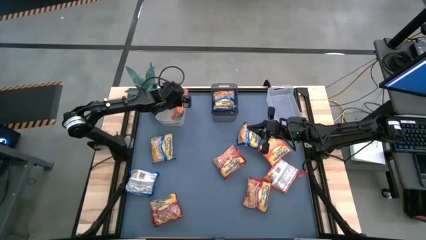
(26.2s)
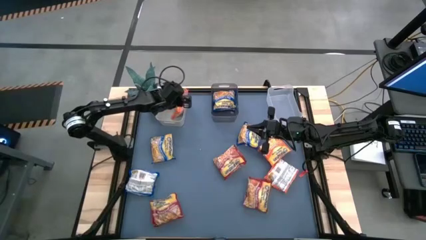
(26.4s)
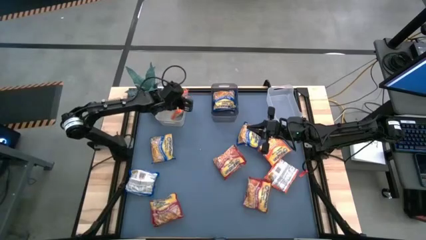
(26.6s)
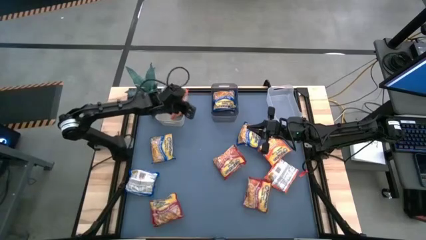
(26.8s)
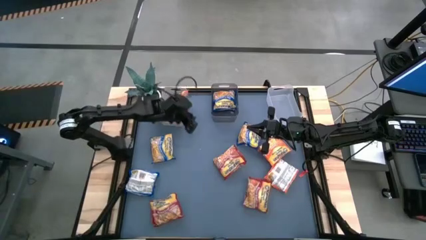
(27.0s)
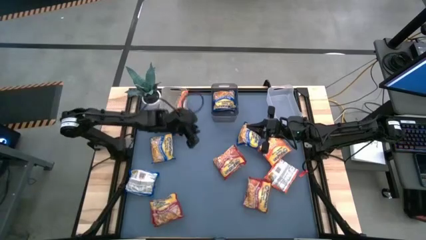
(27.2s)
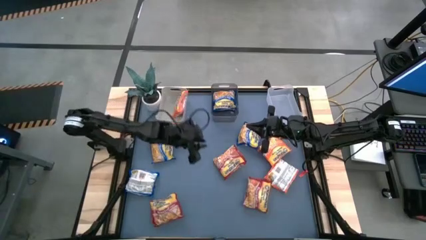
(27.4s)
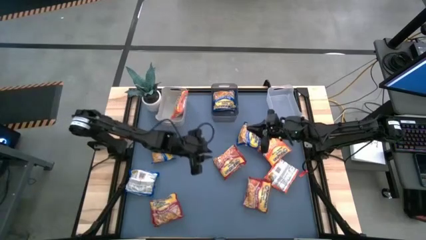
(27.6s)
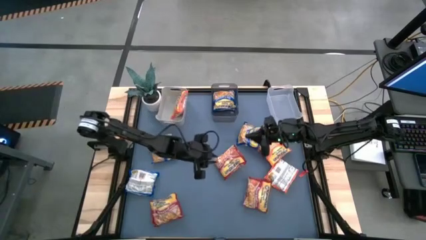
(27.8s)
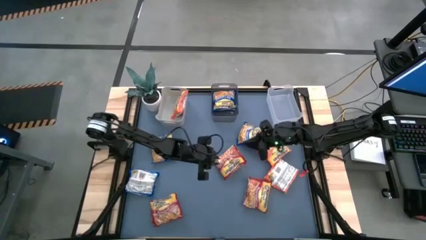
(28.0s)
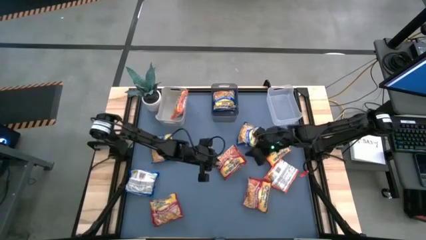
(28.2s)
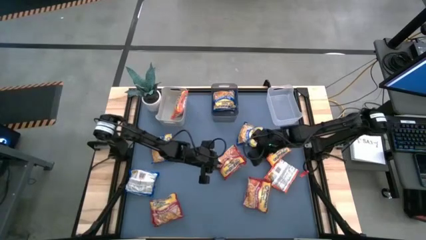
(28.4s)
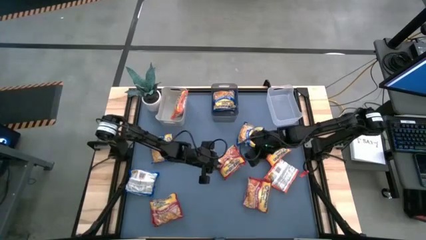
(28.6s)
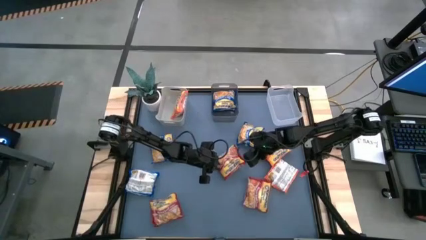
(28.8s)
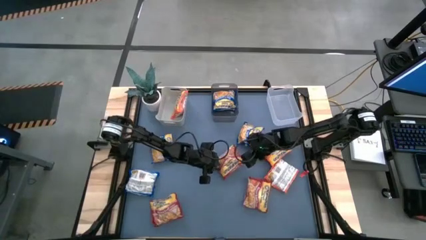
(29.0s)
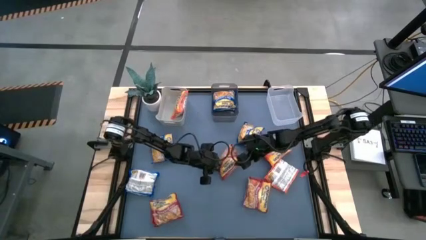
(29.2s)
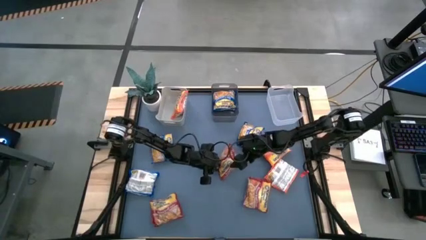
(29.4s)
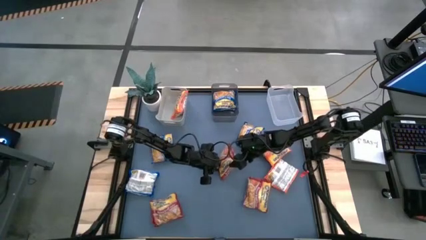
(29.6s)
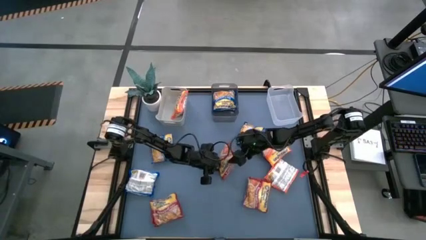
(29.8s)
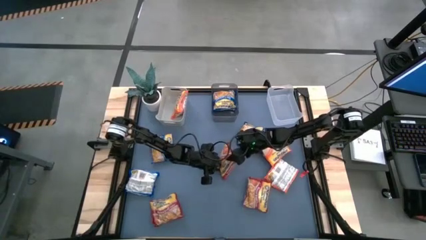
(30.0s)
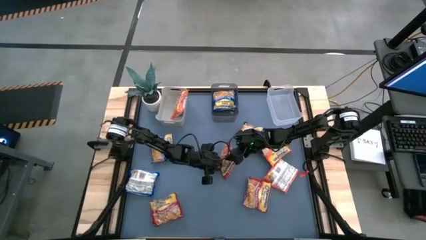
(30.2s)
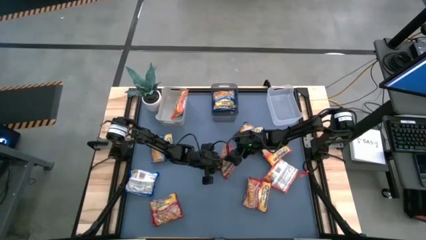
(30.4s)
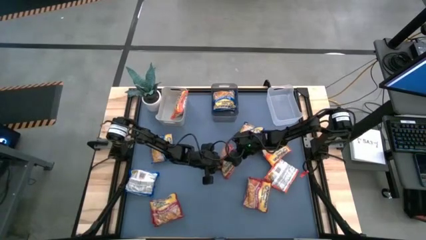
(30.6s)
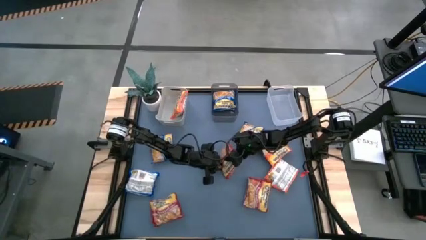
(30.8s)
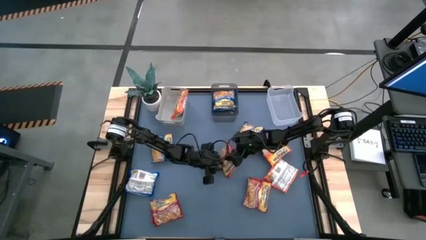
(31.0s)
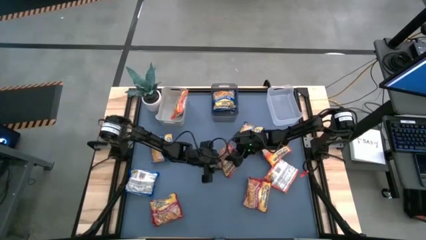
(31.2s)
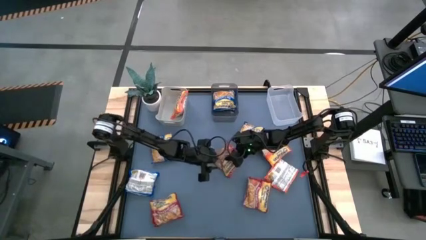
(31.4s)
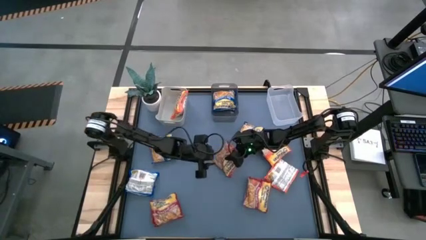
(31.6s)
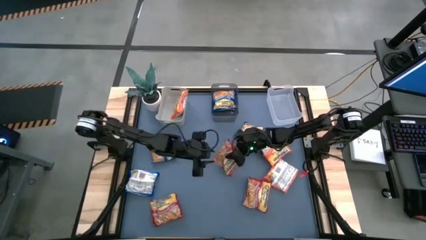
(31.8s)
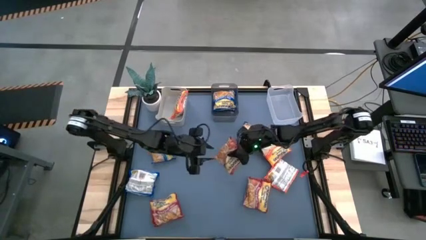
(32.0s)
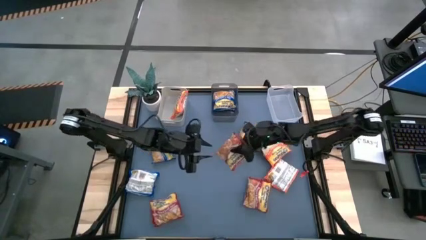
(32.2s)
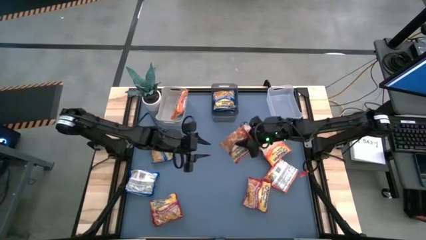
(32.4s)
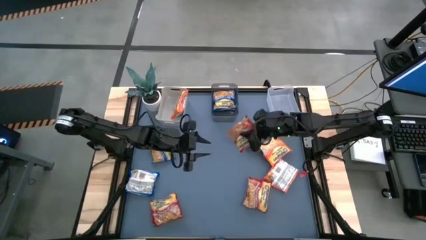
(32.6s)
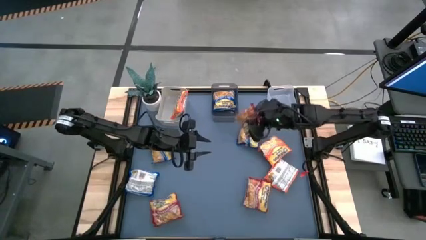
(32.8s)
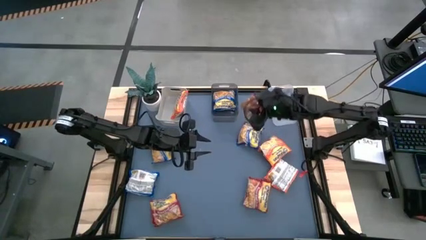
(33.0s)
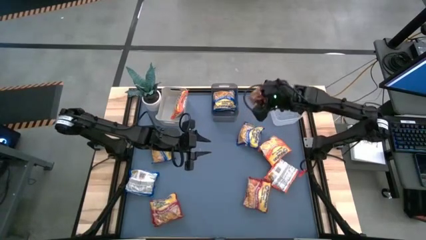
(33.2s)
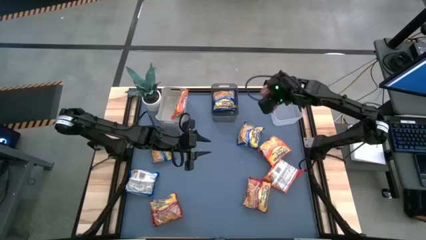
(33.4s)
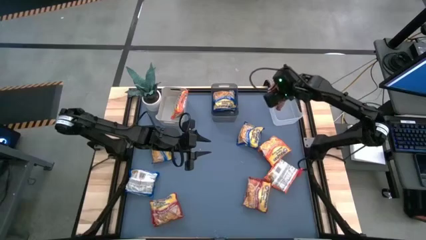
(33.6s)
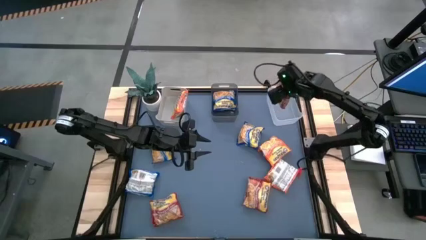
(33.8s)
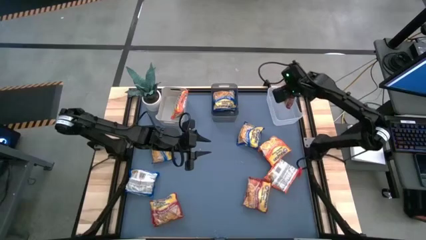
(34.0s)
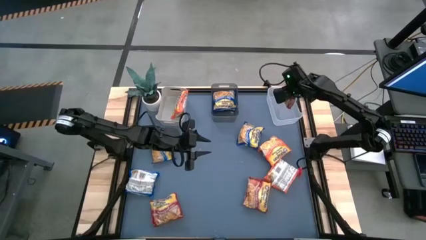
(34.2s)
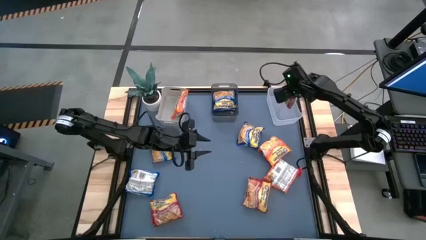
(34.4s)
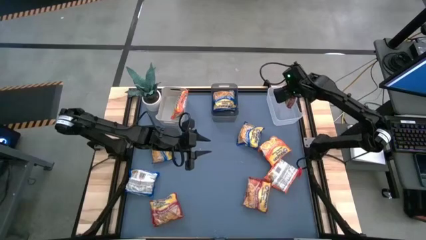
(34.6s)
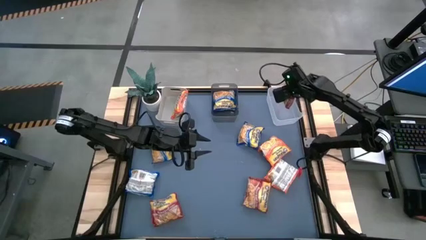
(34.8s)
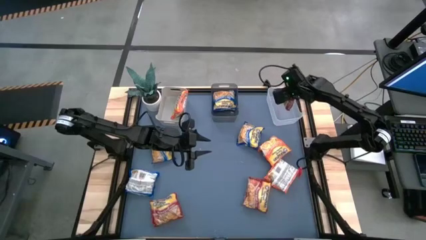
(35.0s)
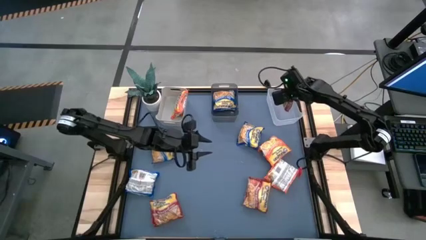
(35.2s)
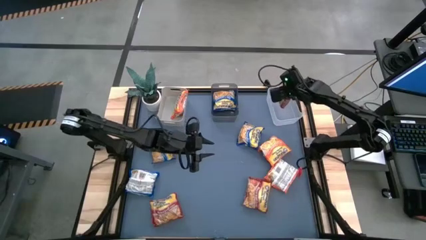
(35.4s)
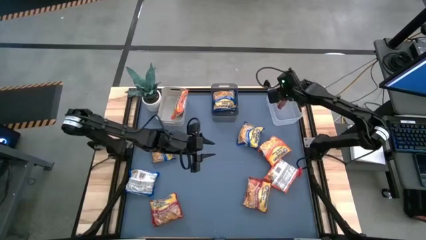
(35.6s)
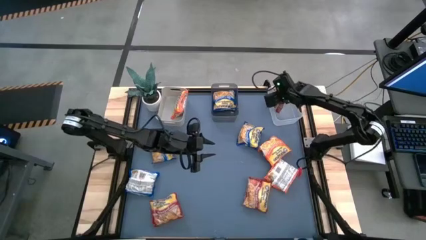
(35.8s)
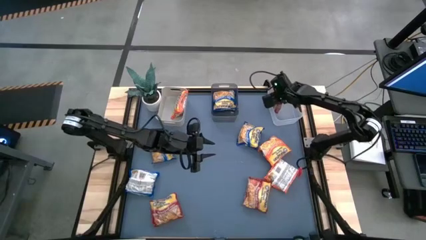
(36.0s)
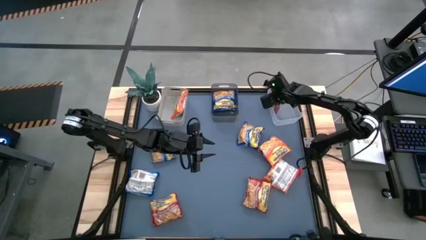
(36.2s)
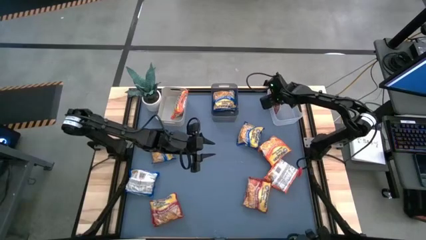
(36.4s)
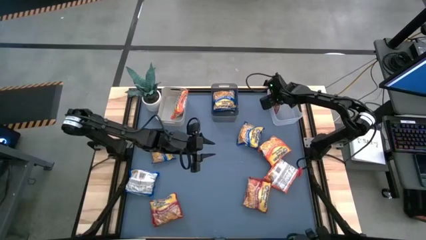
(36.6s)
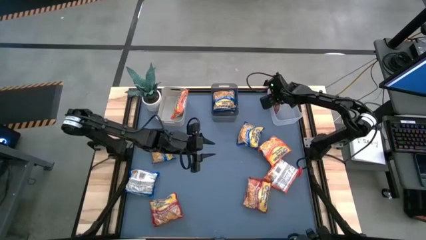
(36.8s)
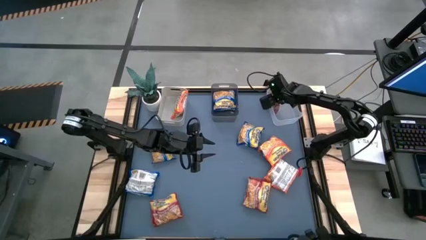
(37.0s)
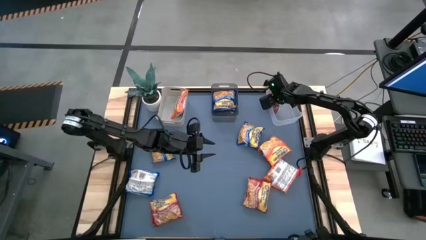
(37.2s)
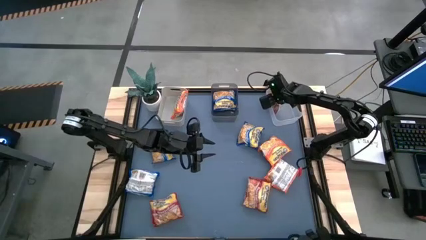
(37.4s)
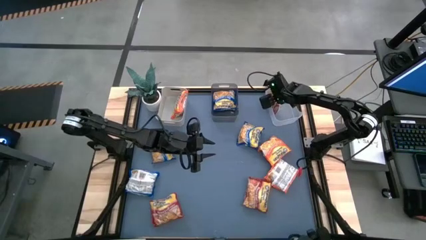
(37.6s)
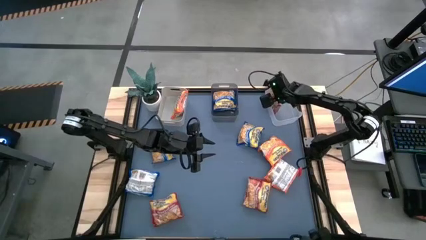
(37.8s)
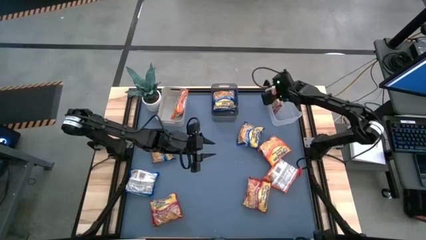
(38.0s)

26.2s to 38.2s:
Task: Sort Maruchan noodles
Put the red noodle pack into the transparent bin

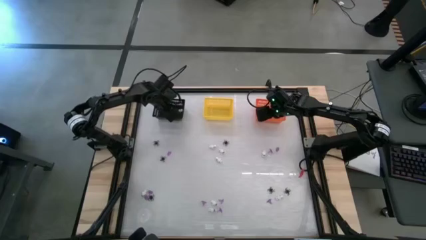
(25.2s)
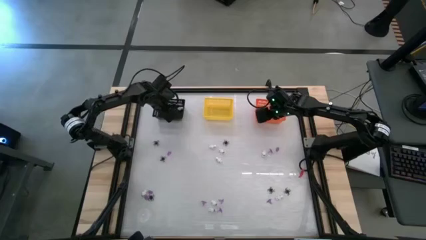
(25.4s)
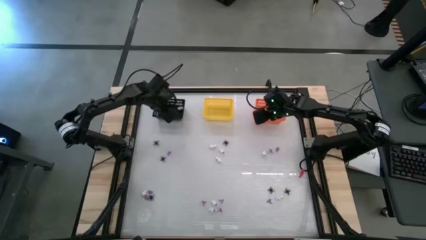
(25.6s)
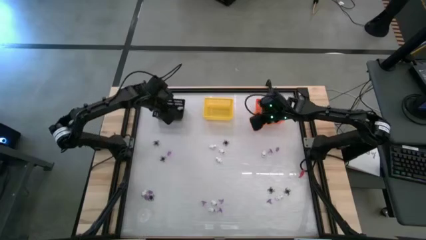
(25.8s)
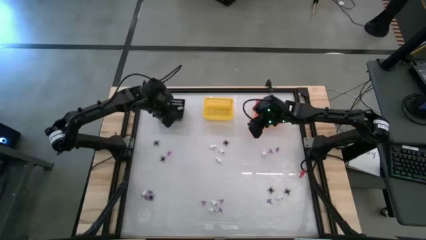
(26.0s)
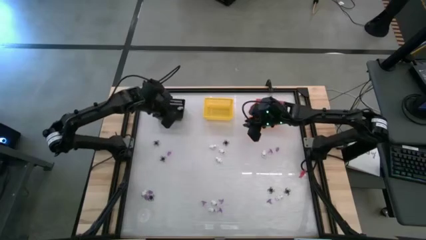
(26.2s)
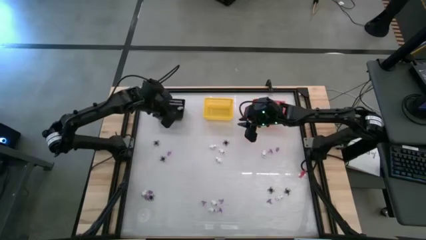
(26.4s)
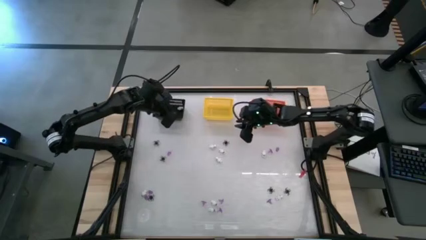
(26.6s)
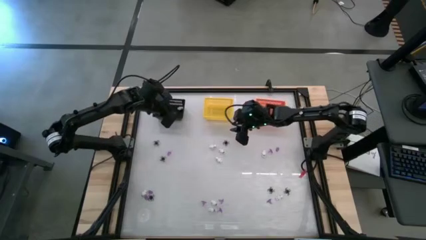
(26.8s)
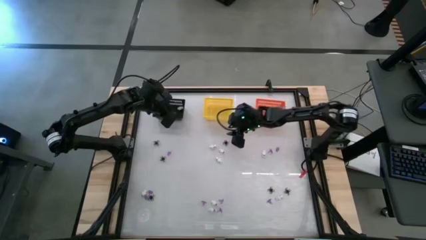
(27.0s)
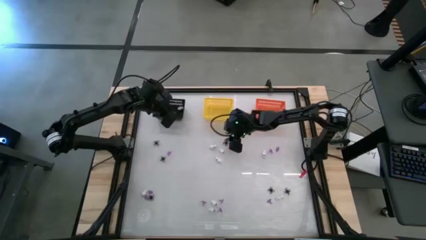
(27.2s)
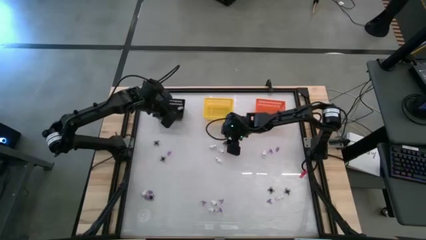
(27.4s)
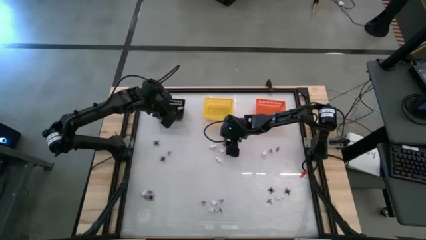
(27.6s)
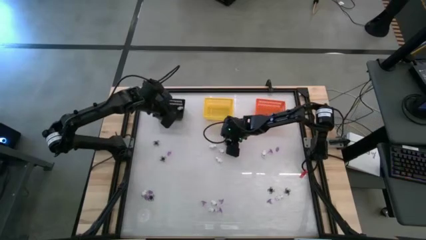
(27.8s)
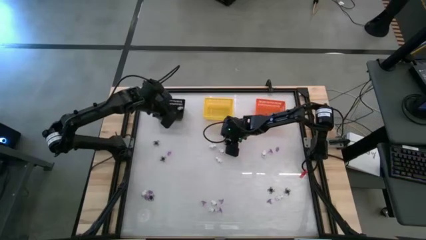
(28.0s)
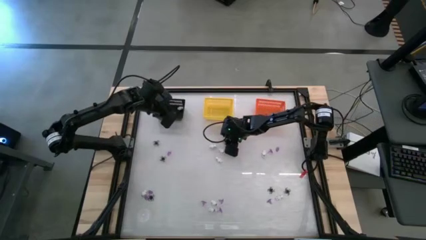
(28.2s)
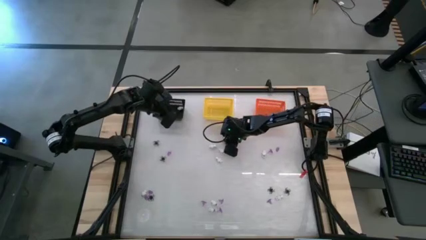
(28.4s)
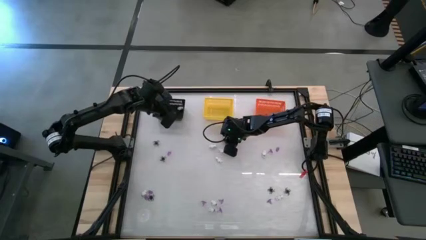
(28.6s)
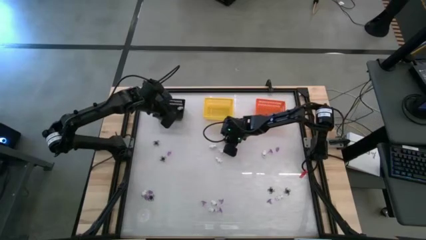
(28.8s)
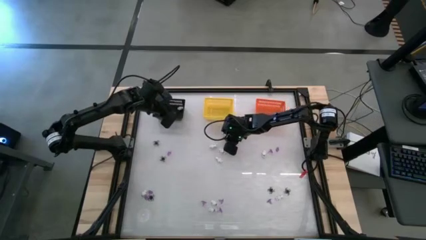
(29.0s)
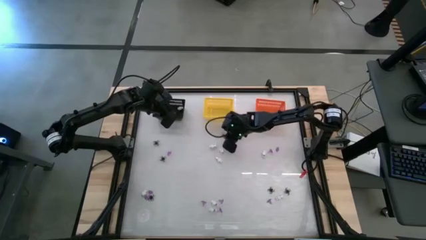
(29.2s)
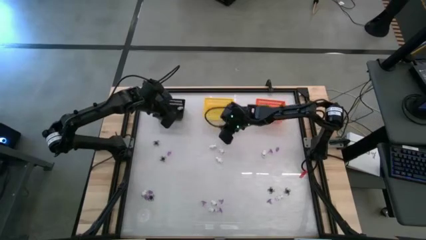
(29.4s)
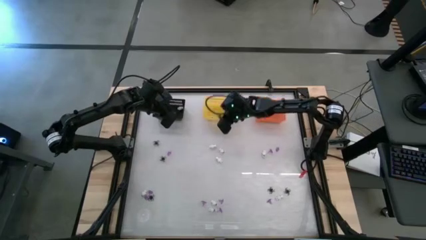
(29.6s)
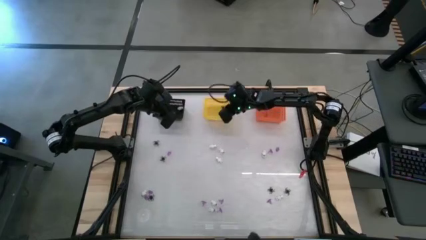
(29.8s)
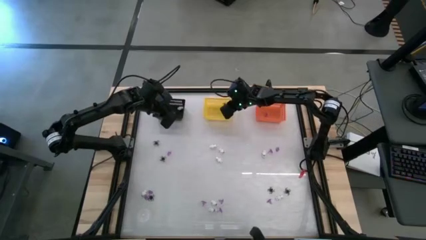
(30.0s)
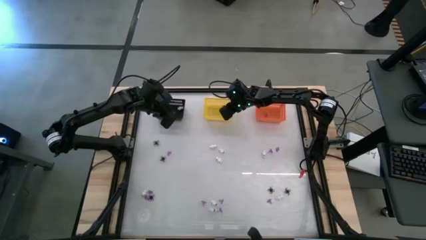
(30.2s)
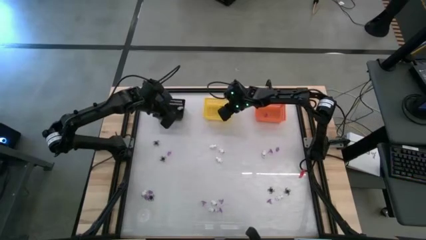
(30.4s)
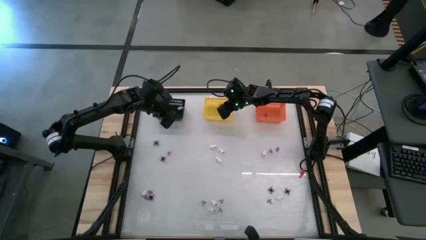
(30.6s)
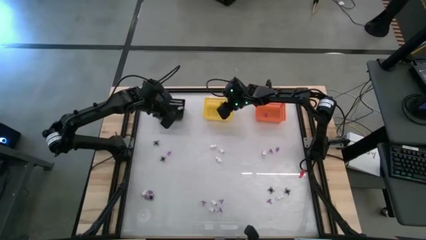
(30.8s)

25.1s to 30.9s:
Task: Sort Halloween decoration
Put the black spider toy into the yellow basket
